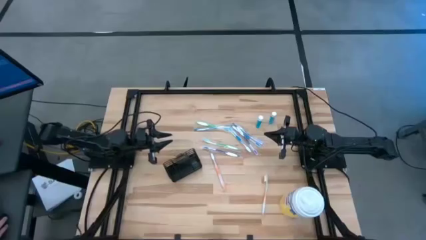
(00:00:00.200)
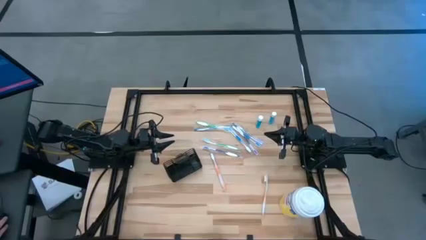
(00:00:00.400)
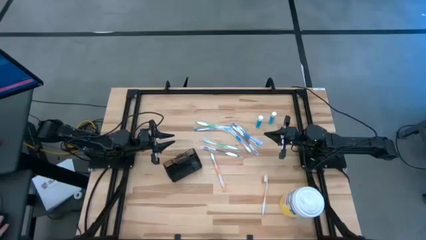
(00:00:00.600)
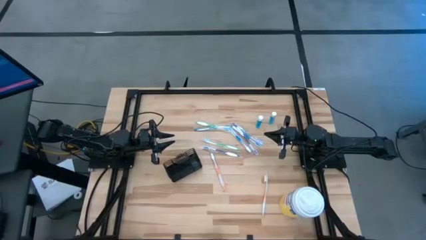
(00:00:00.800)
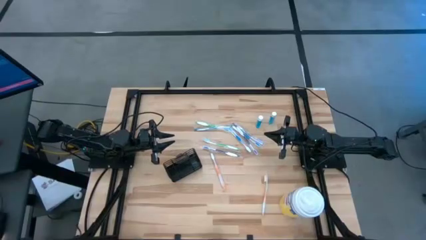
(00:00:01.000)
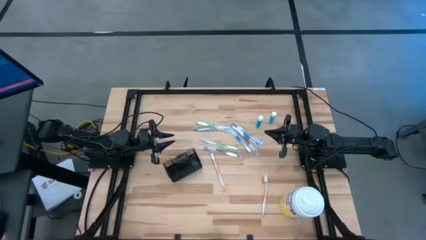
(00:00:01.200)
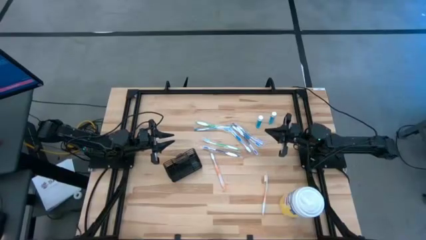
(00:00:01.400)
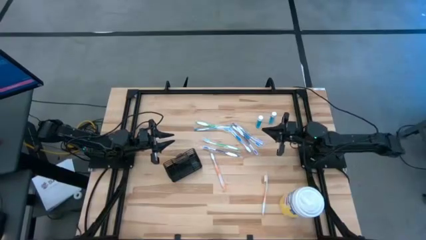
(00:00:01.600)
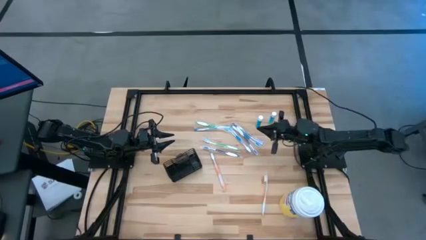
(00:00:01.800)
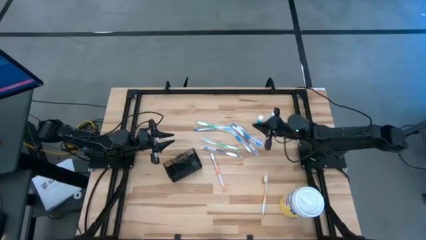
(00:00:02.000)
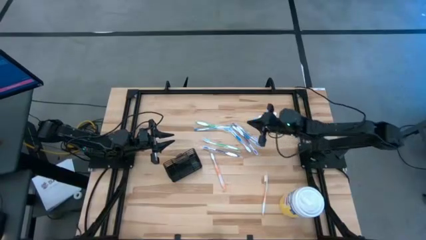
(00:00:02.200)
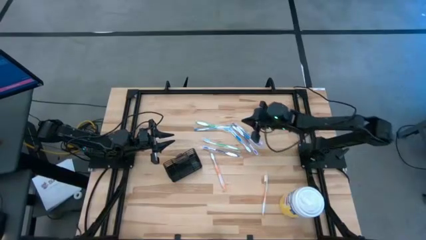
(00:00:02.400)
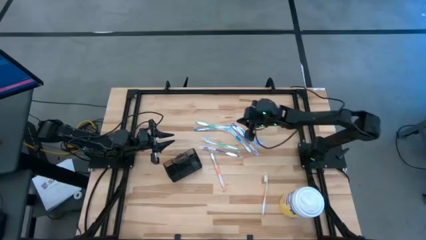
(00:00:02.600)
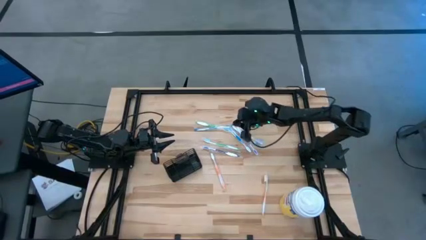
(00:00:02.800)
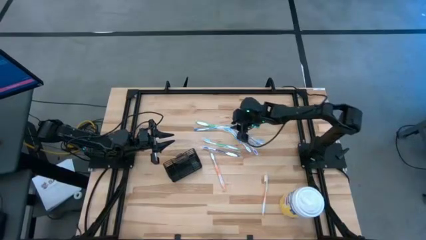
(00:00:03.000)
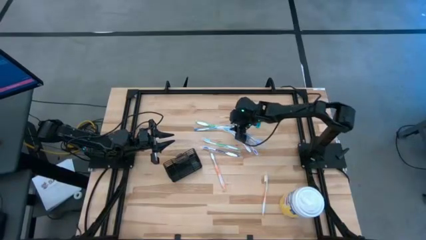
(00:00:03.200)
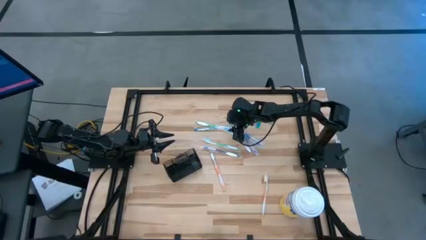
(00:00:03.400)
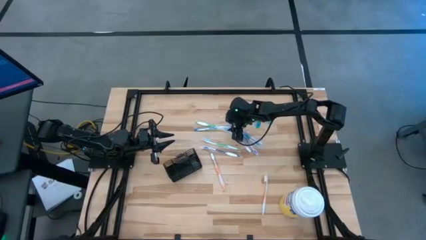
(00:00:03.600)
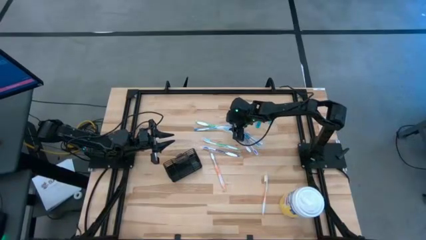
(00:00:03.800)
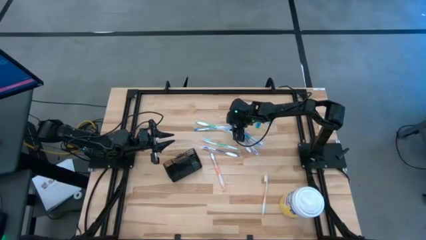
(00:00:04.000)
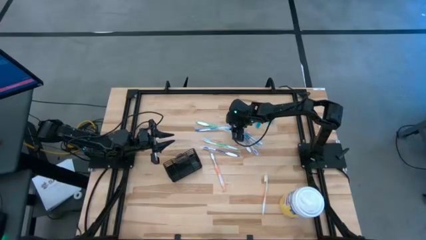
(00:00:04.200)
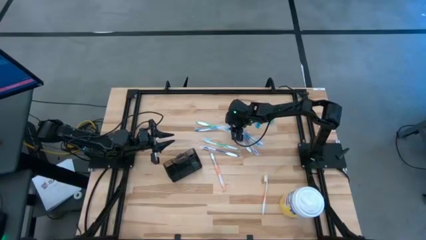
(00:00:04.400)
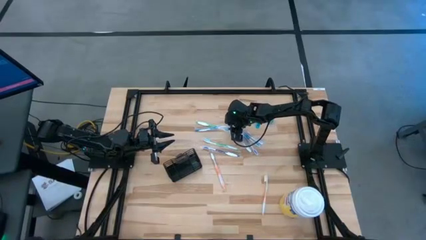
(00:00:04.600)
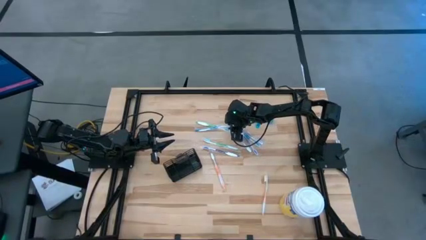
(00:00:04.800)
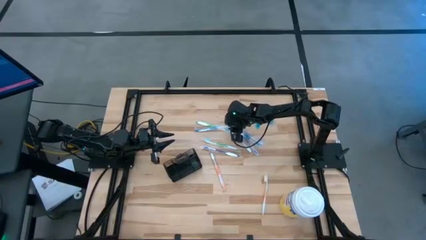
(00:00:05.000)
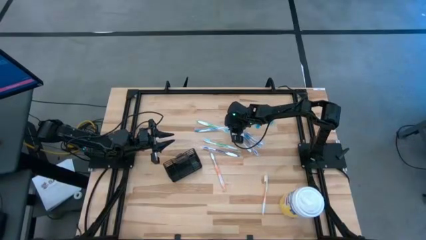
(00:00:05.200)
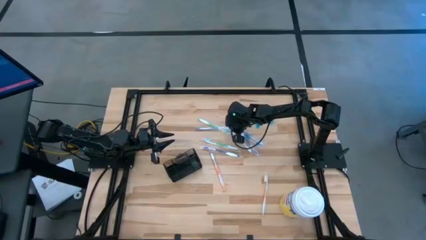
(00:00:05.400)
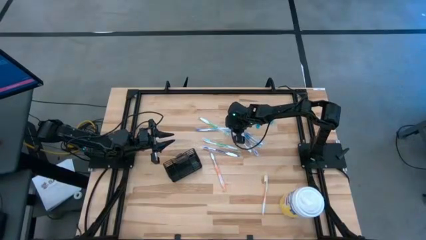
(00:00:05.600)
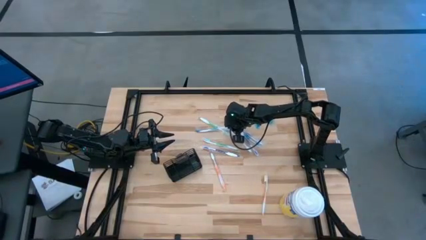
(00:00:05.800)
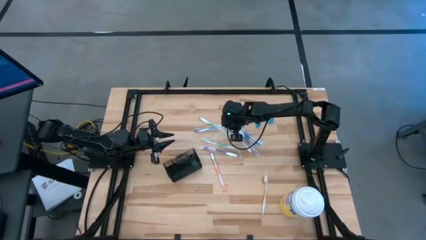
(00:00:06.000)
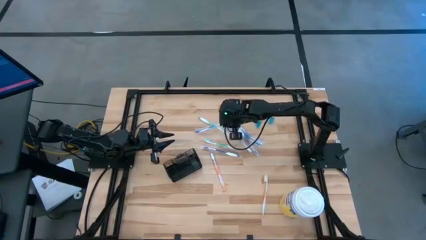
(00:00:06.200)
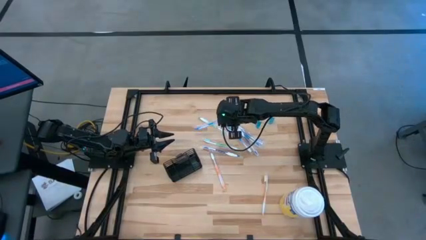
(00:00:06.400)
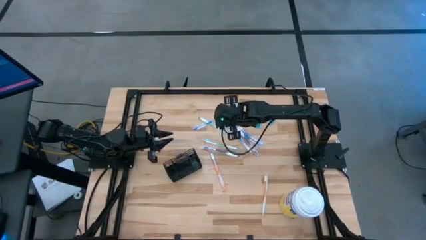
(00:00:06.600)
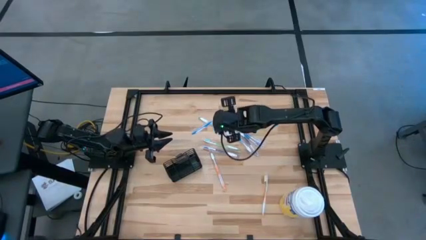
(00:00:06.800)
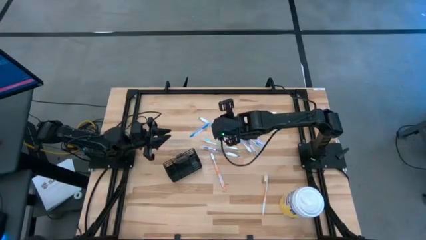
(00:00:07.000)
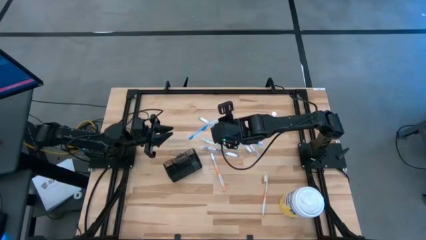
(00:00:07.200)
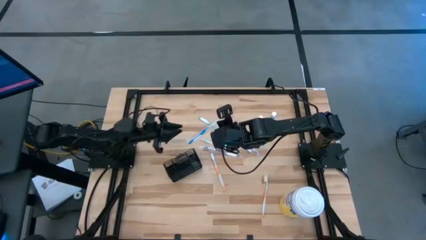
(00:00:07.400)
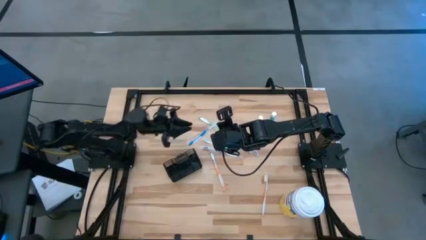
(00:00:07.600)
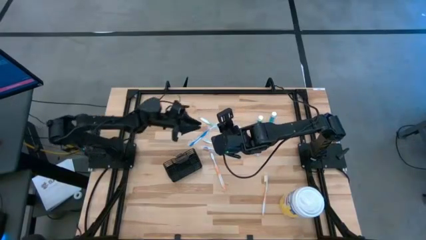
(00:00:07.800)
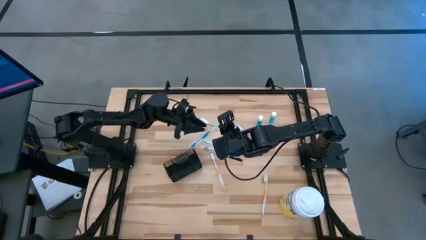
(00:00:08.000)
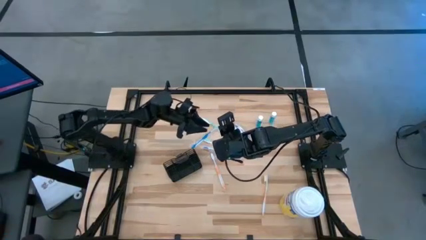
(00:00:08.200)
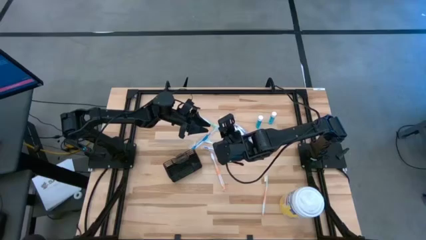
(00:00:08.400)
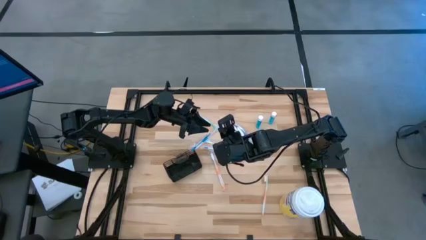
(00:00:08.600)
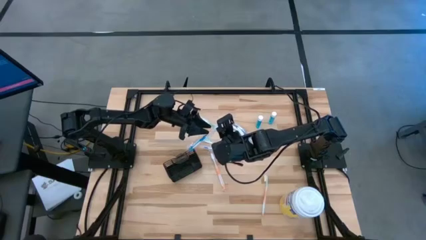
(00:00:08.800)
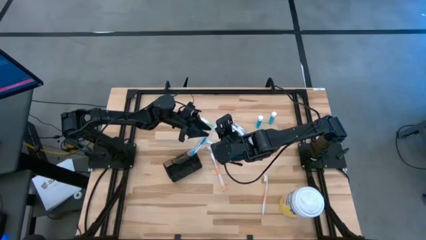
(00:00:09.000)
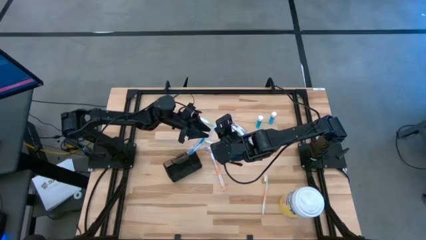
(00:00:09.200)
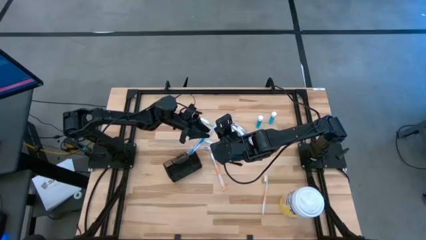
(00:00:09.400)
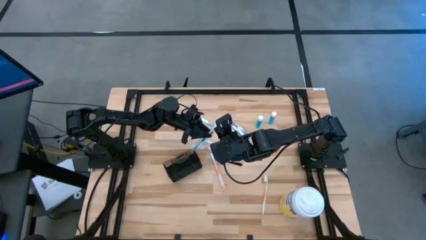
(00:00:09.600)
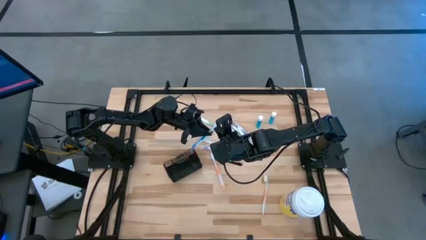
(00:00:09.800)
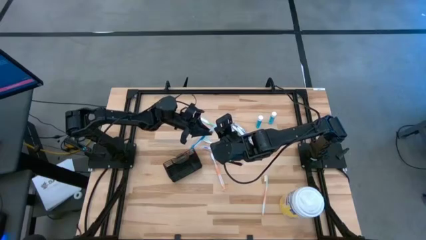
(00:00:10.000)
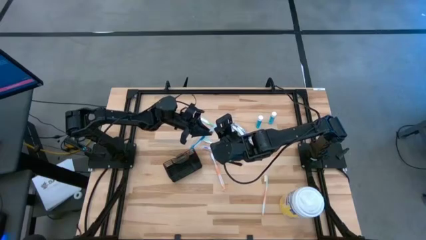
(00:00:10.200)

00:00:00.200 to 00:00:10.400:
Task: Pick & Place toothbrushing station
Put the top blue toothbrush into the top left section of the mesh organizer
